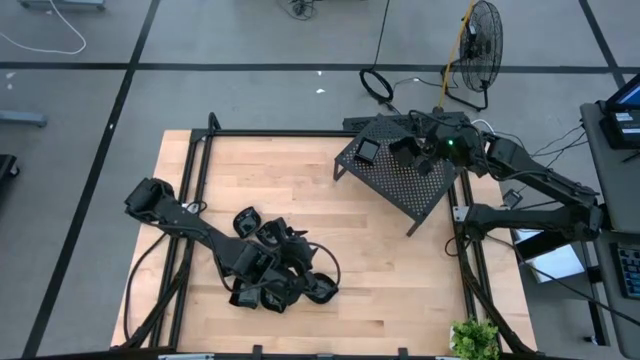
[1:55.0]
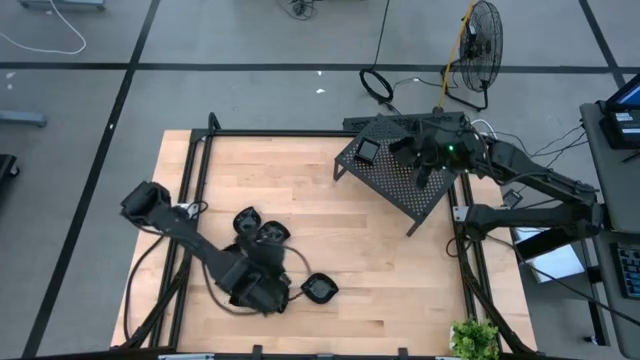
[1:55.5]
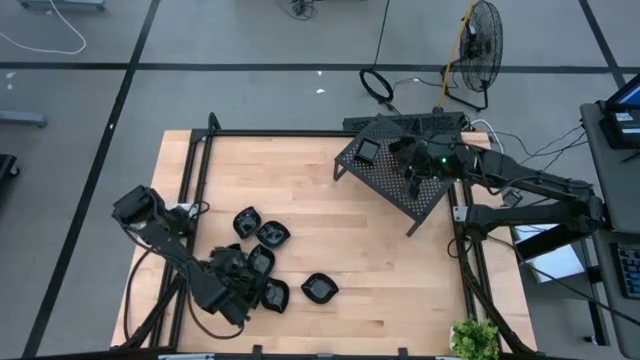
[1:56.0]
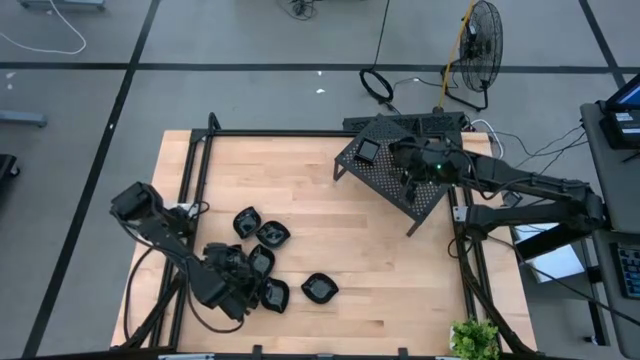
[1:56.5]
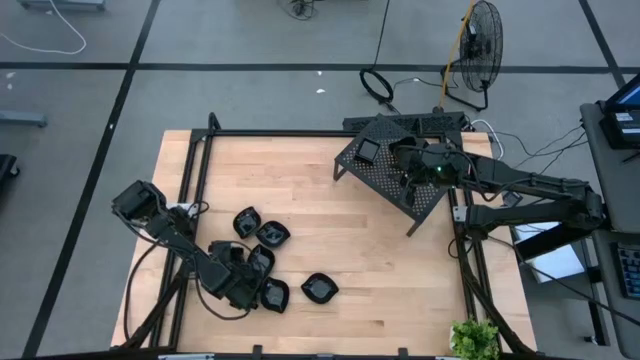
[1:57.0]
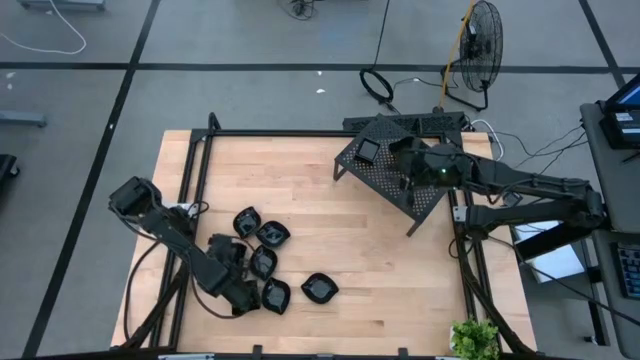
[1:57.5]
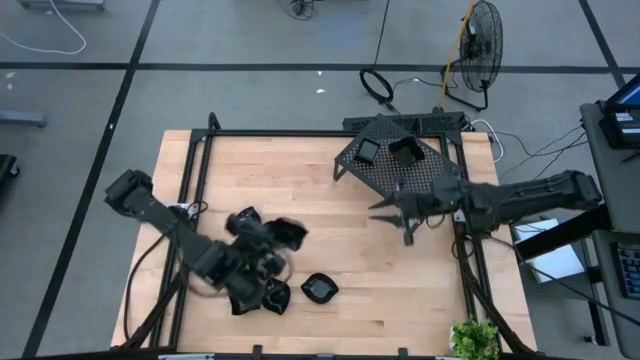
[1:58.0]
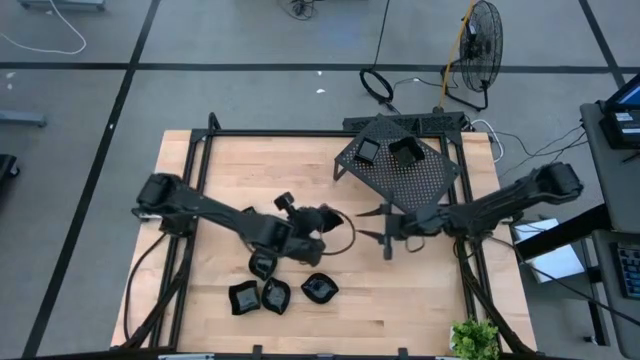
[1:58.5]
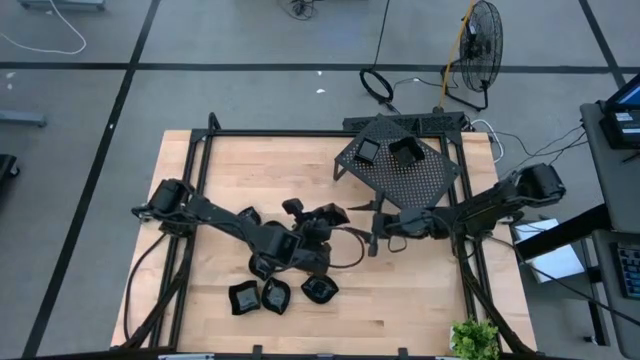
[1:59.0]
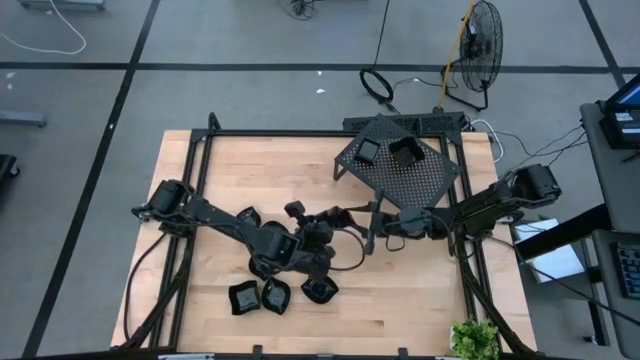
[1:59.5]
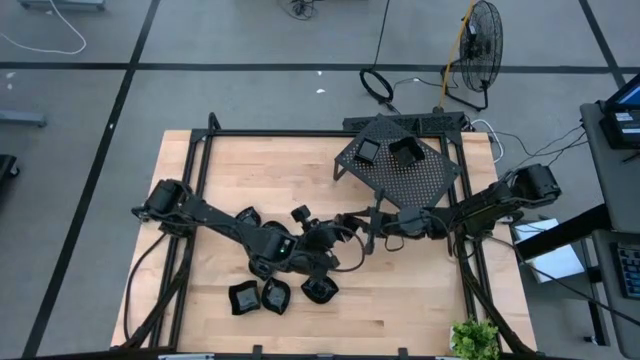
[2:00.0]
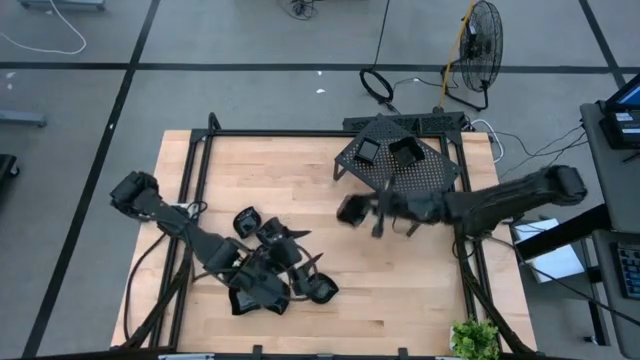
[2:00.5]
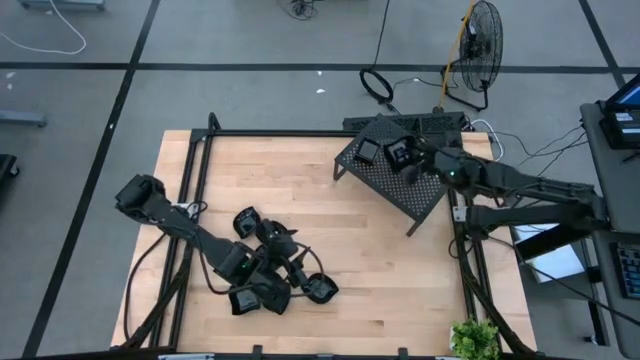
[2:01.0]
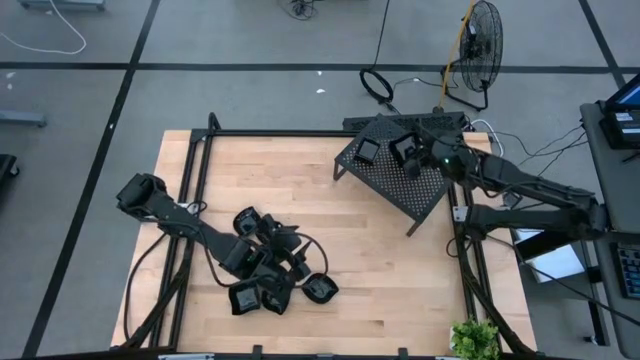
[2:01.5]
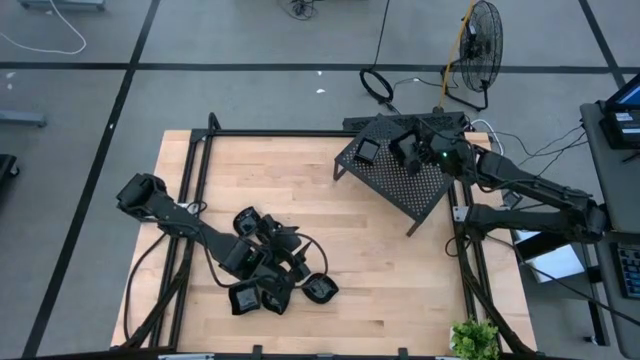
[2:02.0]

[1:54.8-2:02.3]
Task: Pick & Place Mini shaped plates
Stack the black distorted square plate on the black distorted square plate on the shelf

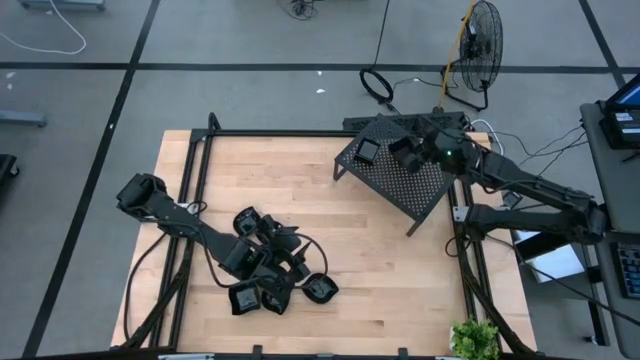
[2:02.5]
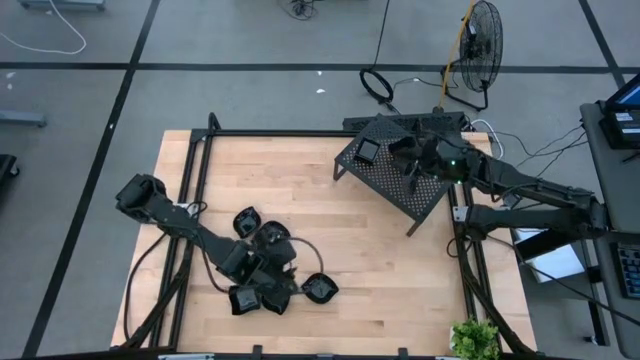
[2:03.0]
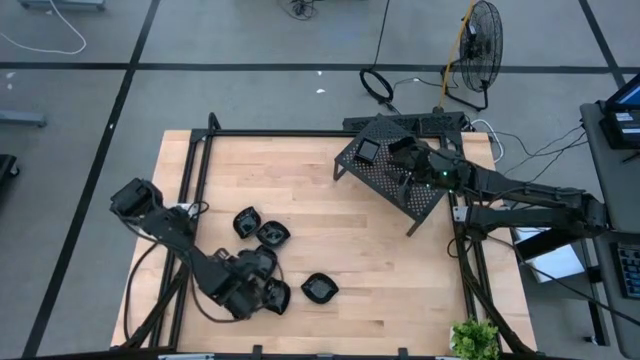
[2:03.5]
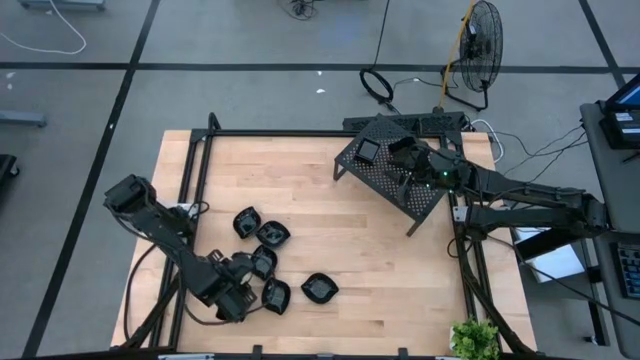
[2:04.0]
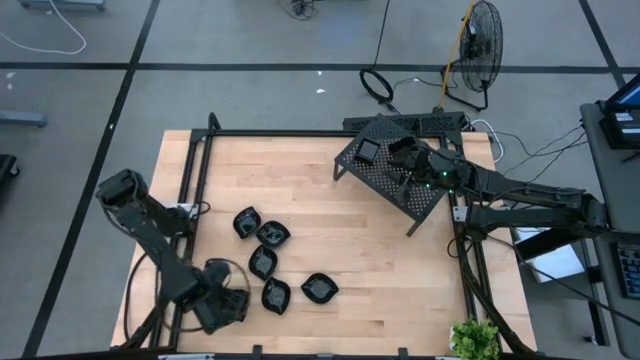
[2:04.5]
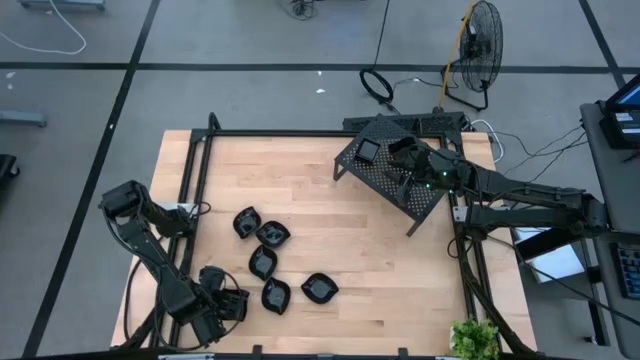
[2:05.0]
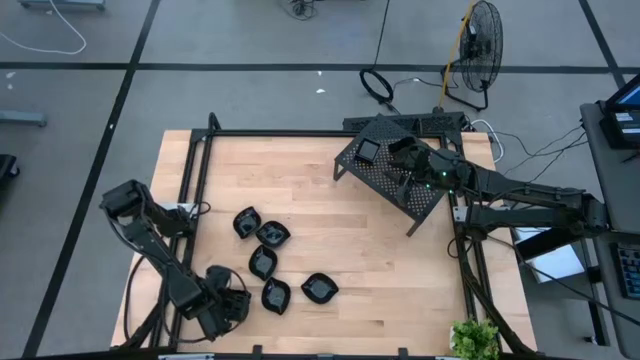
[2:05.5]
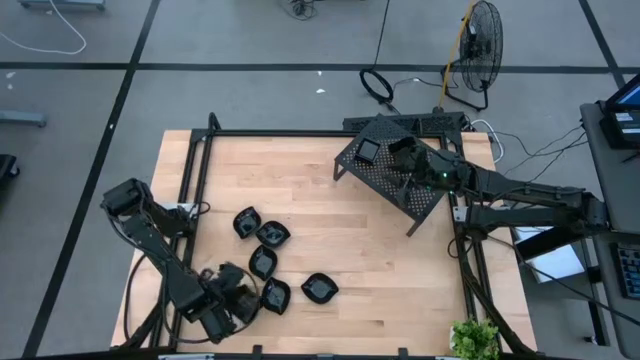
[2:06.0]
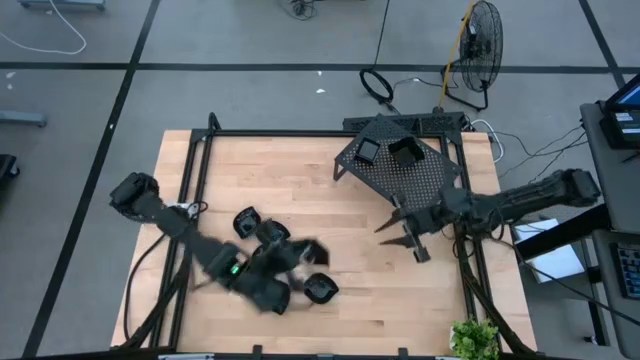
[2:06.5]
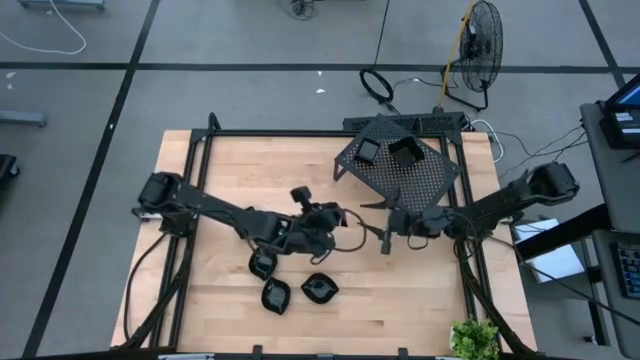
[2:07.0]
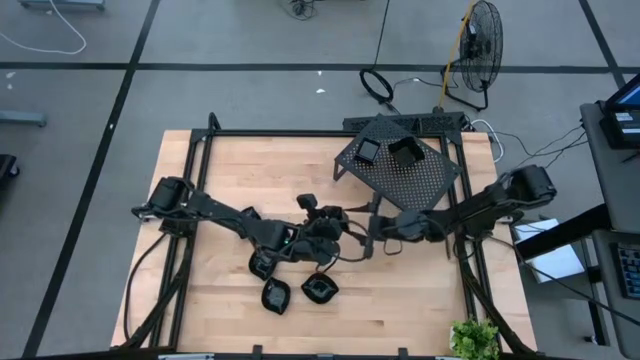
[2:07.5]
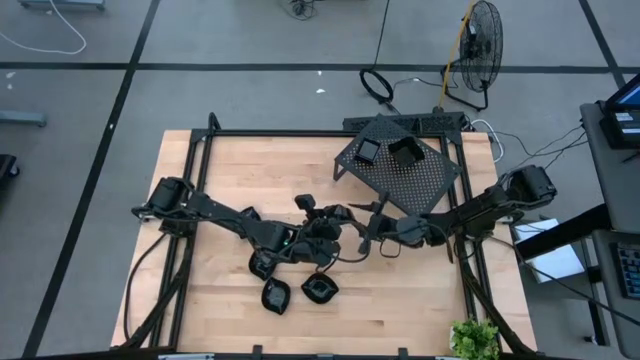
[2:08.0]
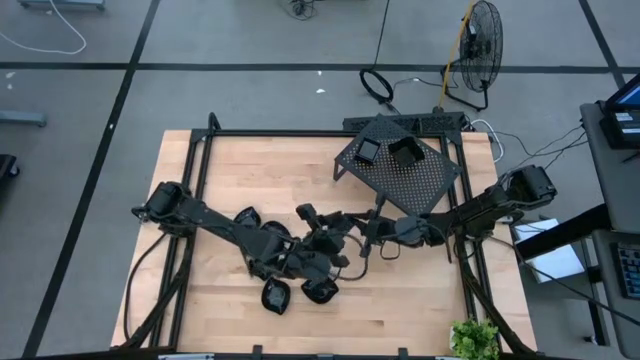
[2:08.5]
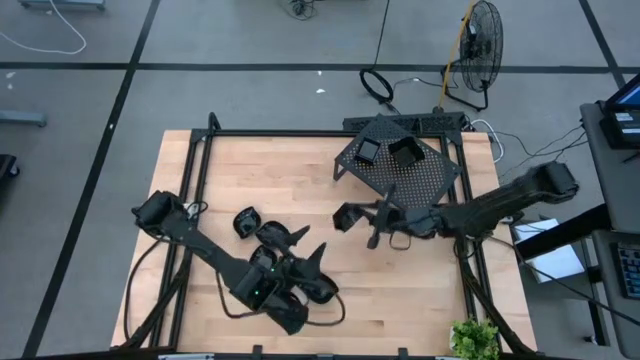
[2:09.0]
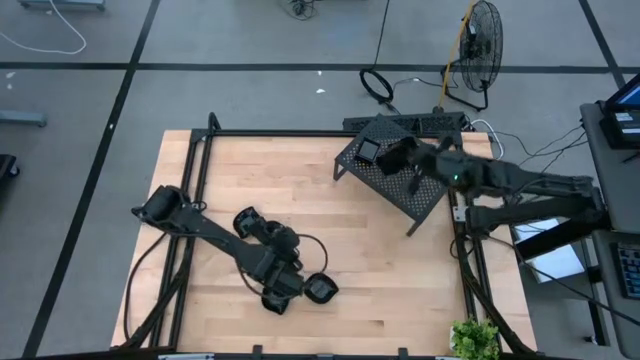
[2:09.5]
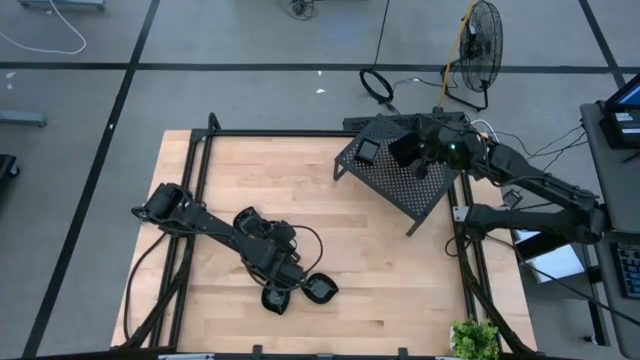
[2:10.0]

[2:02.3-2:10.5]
Stack the black distorted square plate on the black distorted square plate on the shelf

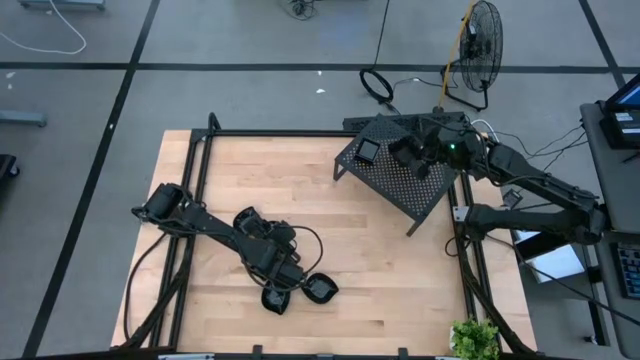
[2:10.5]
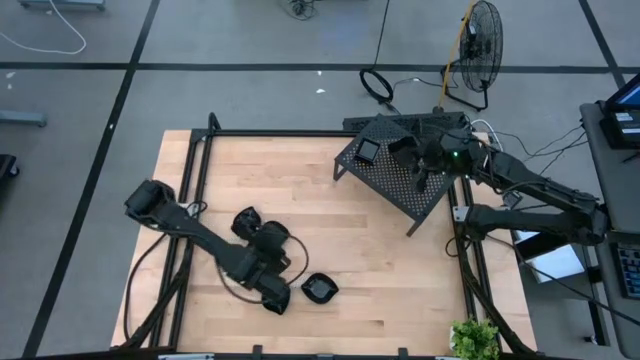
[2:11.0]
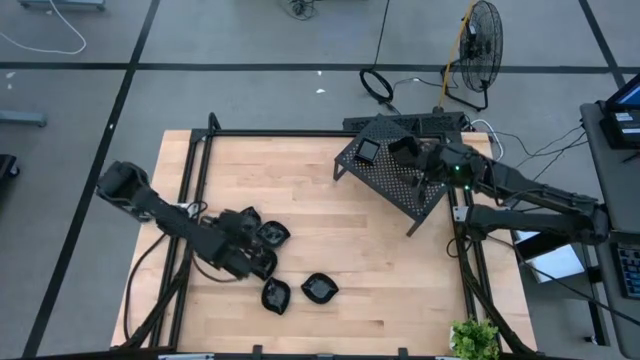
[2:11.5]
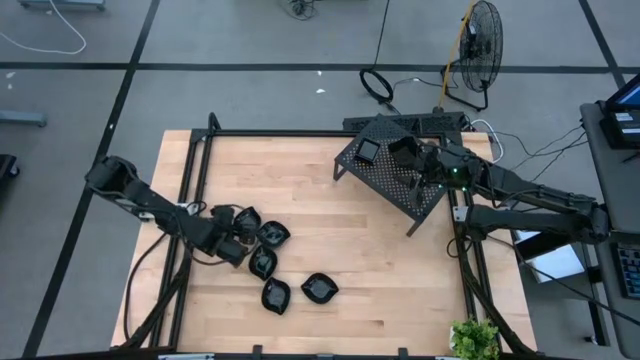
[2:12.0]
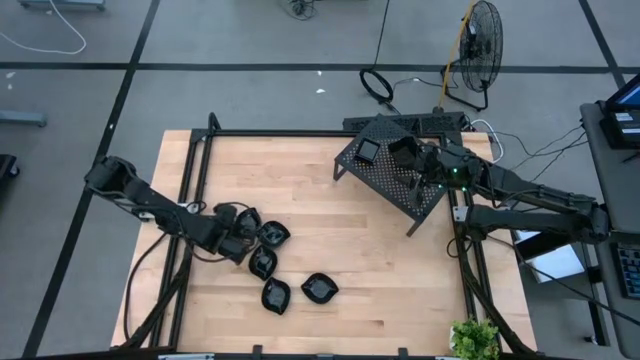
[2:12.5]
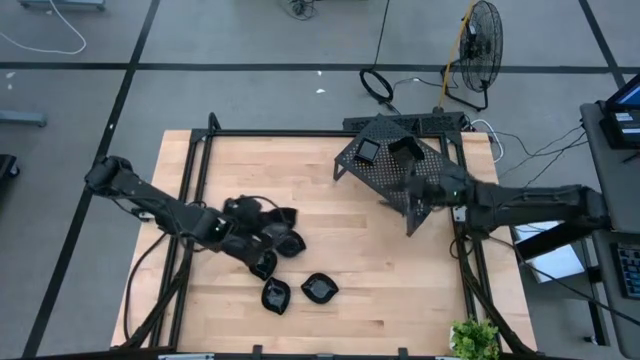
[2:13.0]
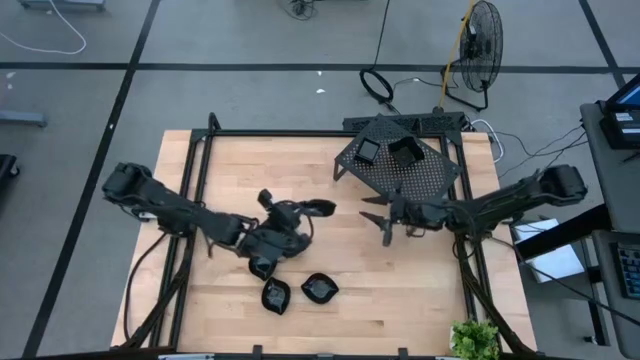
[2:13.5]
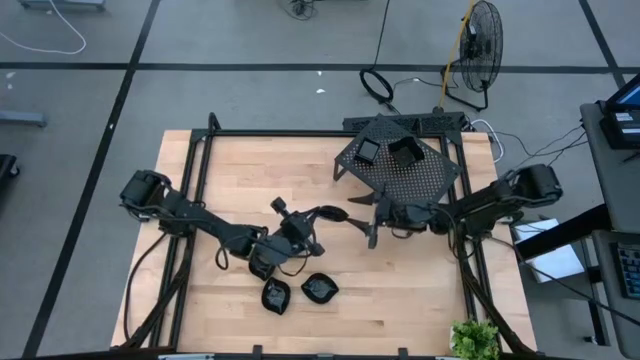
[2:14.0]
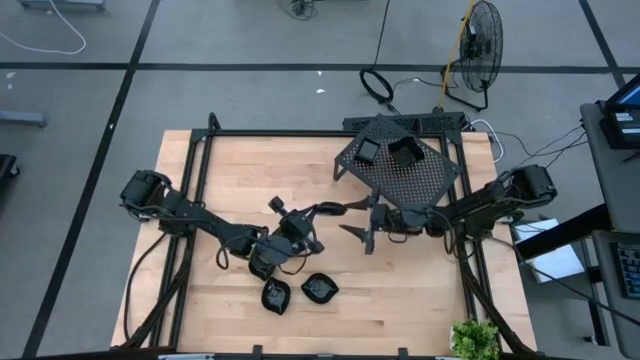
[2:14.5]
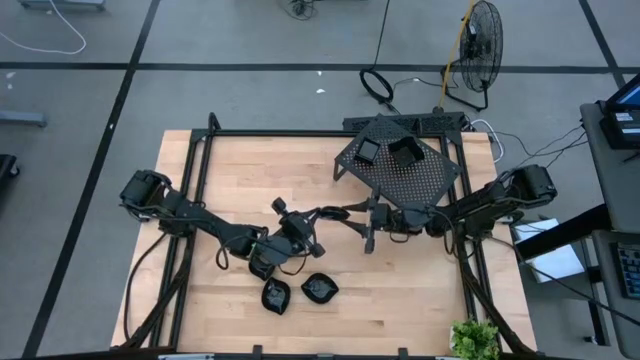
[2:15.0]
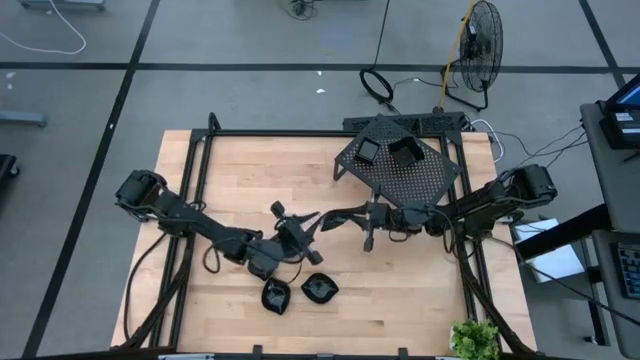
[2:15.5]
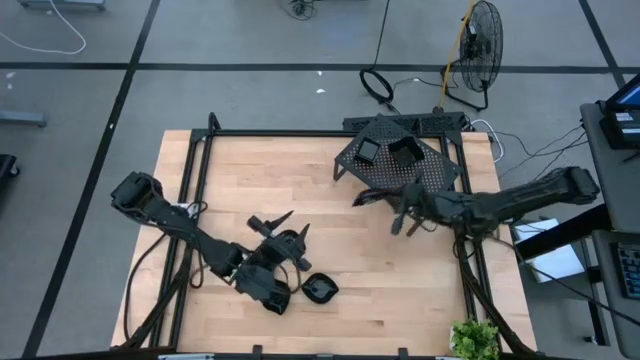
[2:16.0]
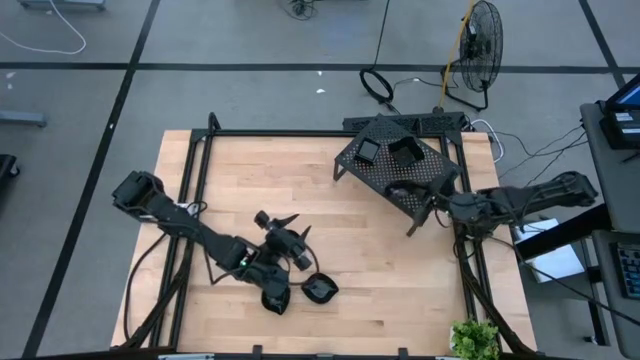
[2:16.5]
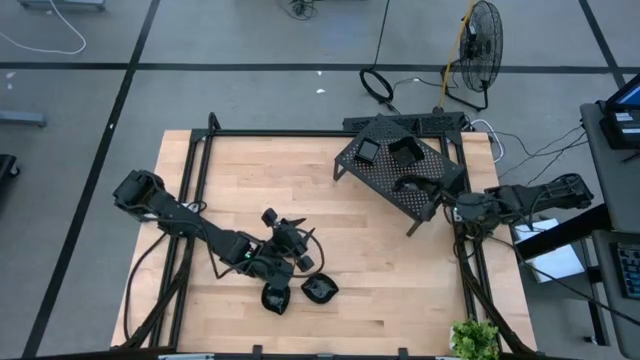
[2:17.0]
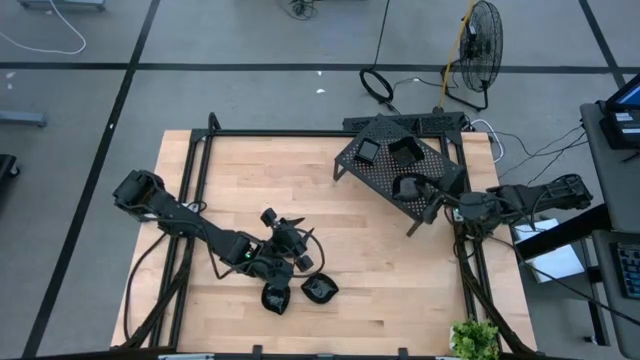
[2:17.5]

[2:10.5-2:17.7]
Put the black leaf shaped plate on the shelf
